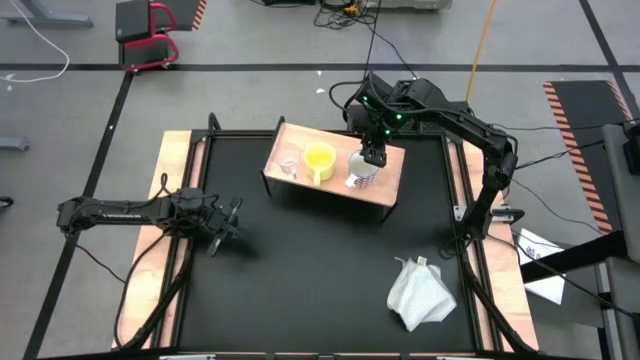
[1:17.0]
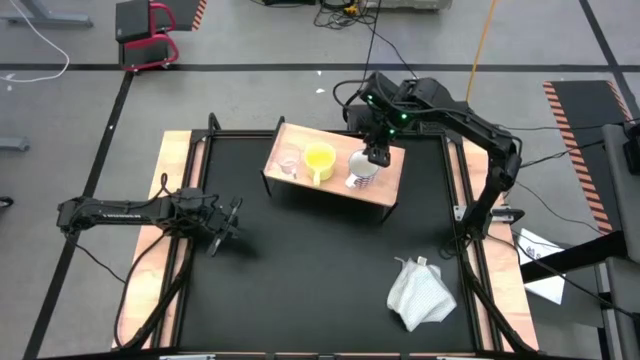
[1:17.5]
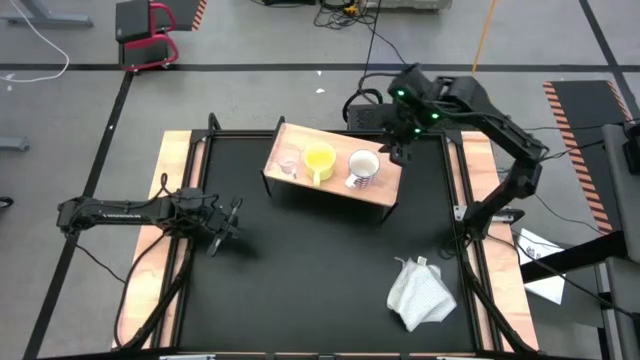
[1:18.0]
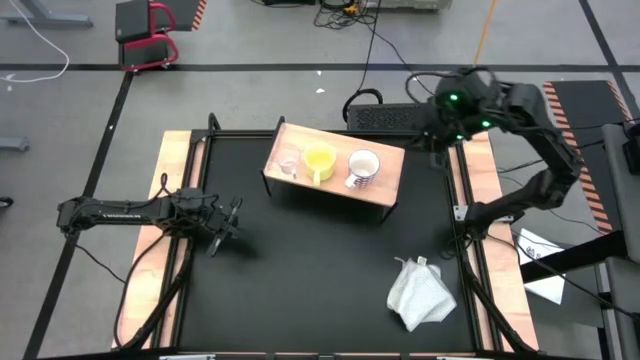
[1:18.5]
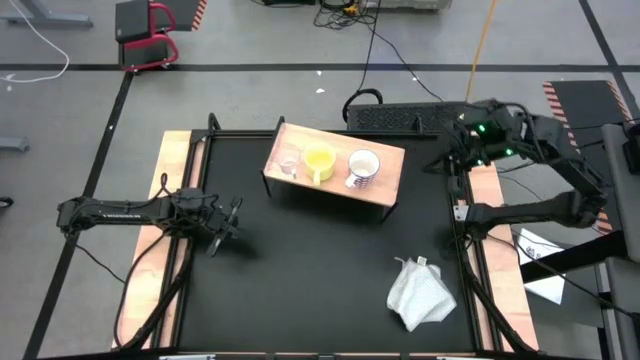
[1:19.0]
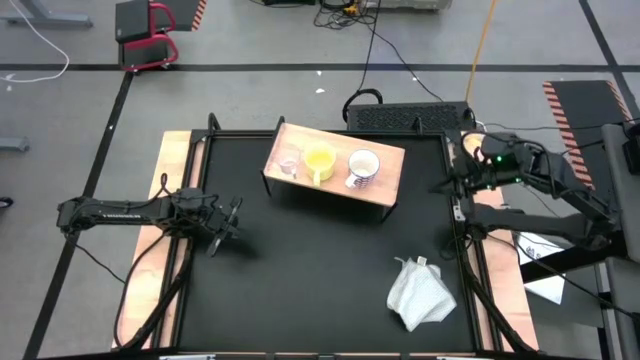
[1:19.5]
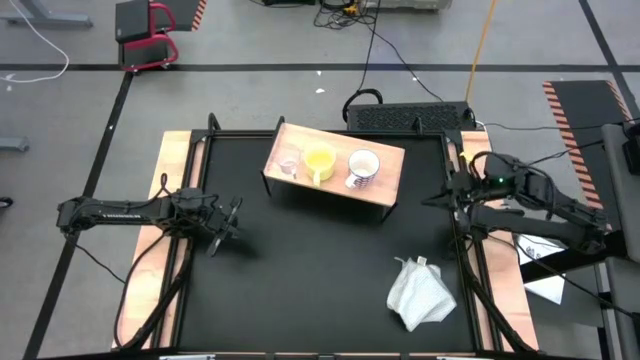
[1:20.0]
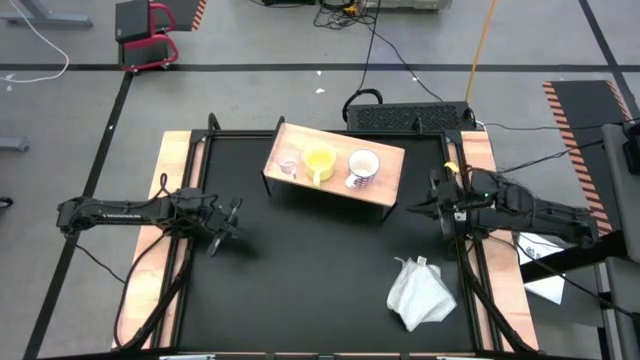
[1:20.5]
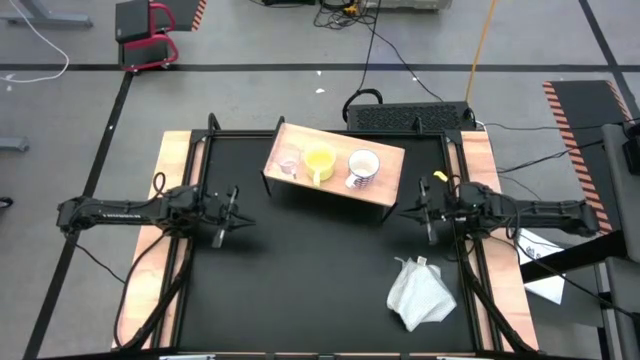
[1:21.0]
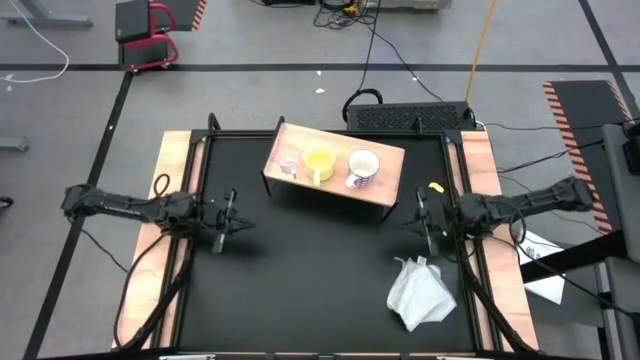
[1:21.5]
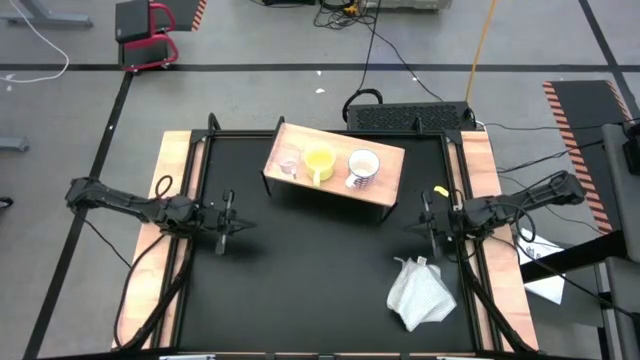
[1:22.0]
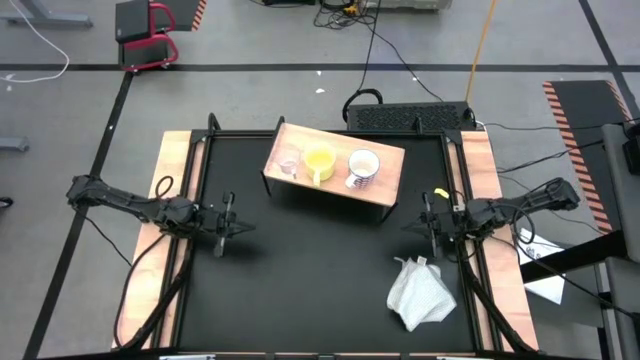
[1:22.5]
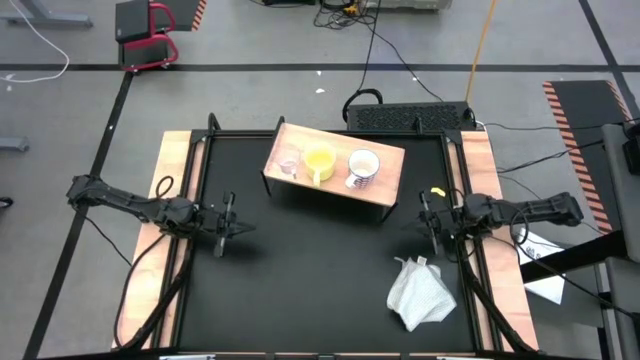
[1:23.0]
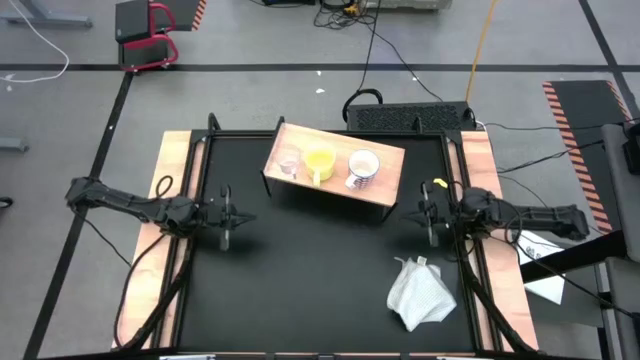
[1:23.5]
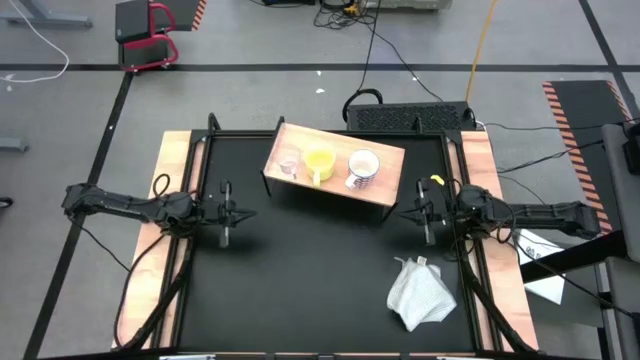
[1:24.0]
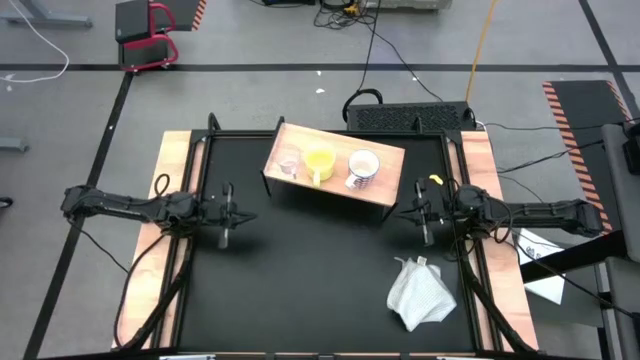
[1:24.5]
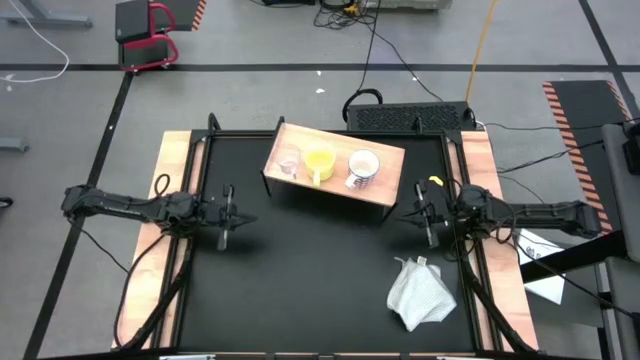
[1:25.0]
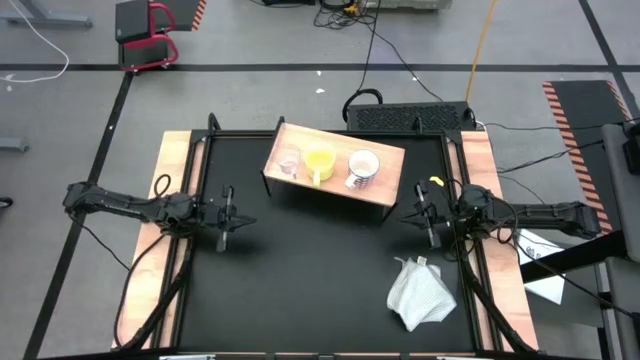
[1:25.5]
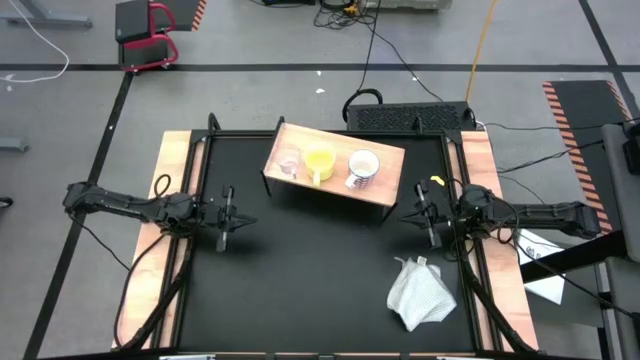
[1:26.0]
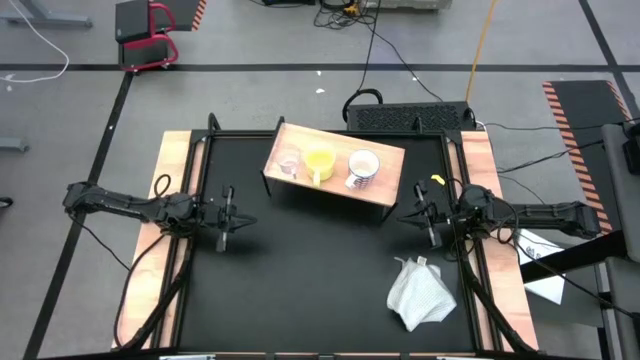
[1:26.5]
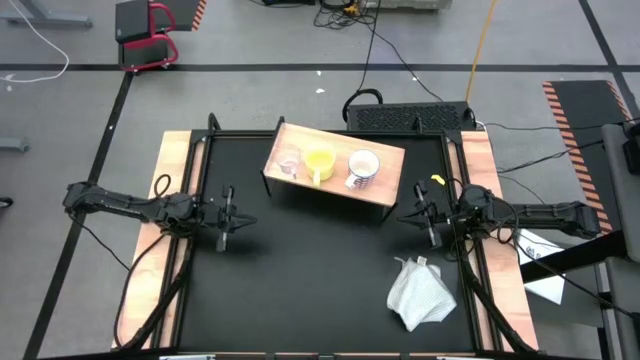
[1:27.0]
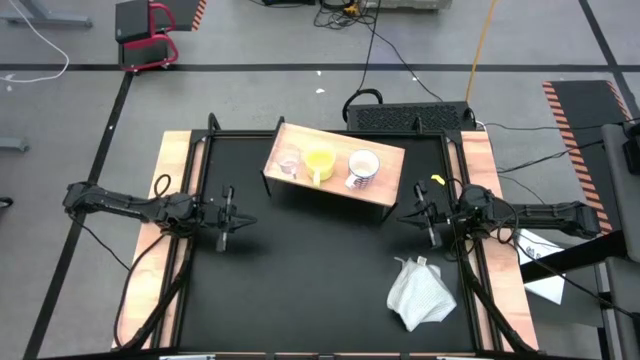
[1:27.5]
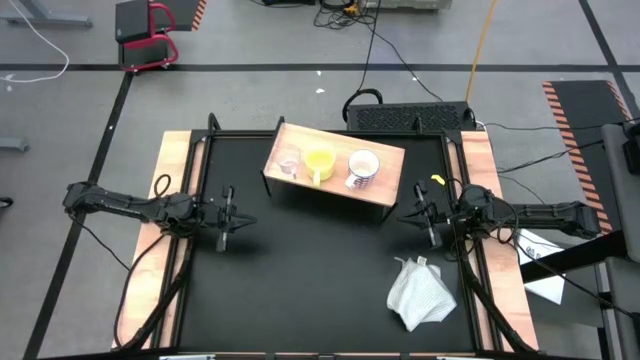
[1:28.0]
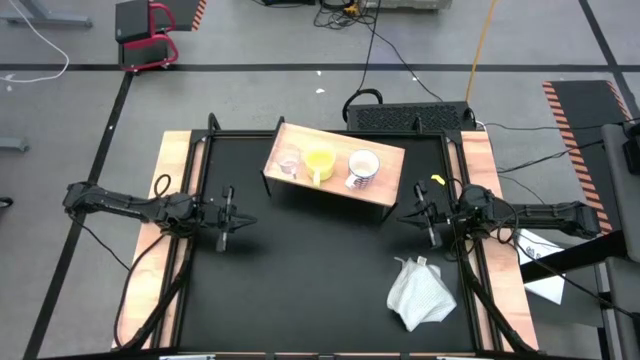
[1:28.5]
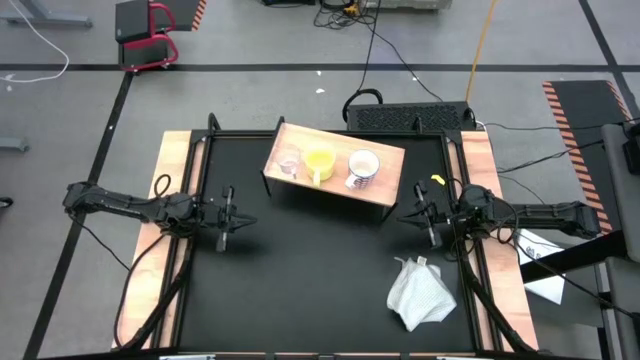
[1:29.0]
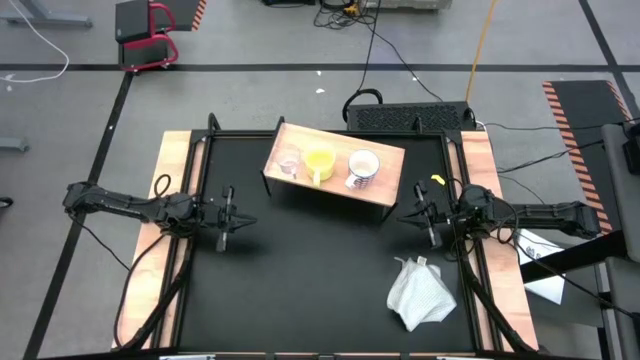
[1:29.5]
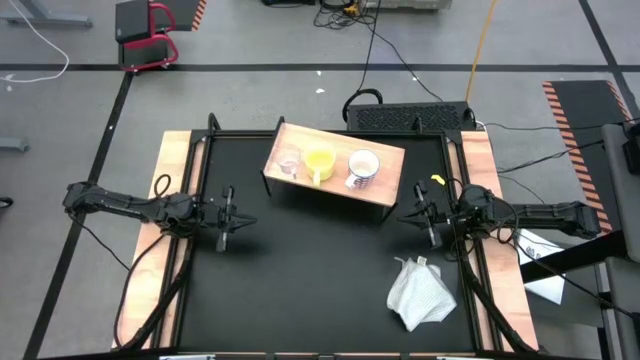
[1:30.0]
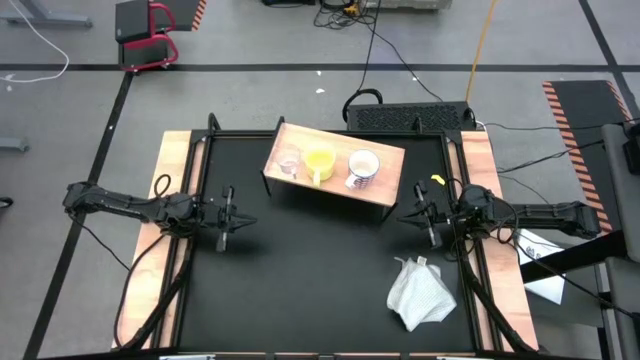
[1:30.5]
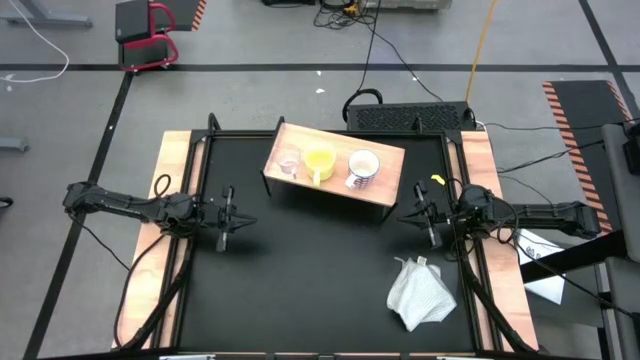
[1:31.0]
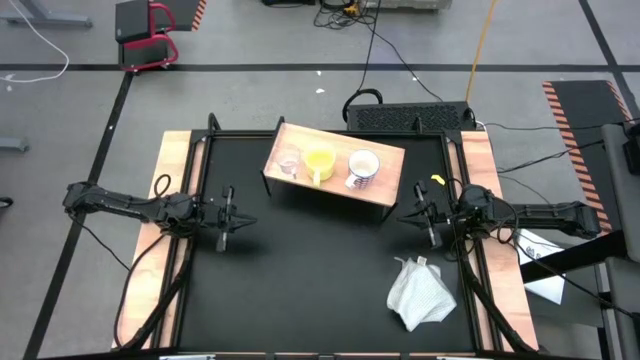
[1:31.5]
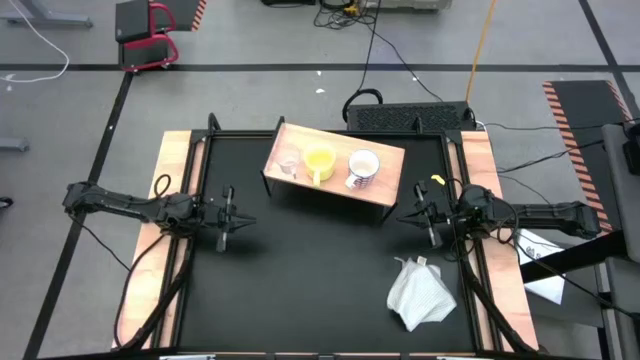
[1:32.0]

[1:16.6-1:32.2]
Task: Stack small to large cups/mugs on shelf
Return to Home Position

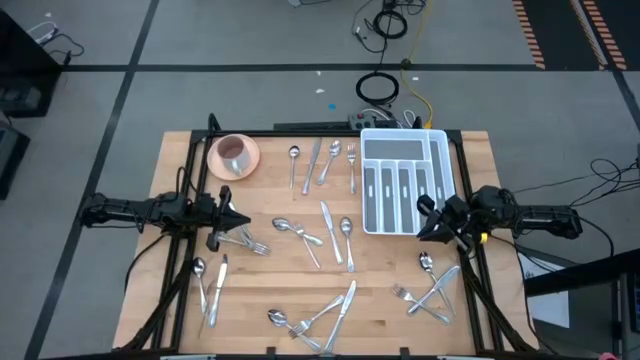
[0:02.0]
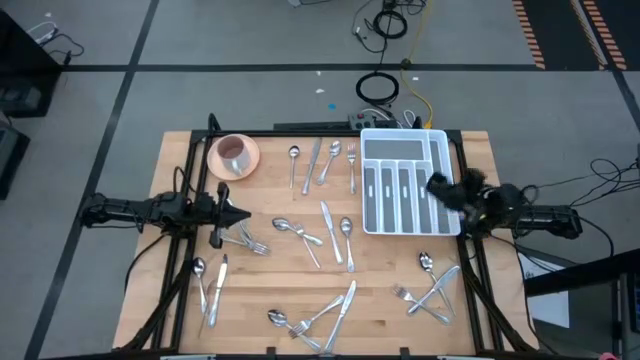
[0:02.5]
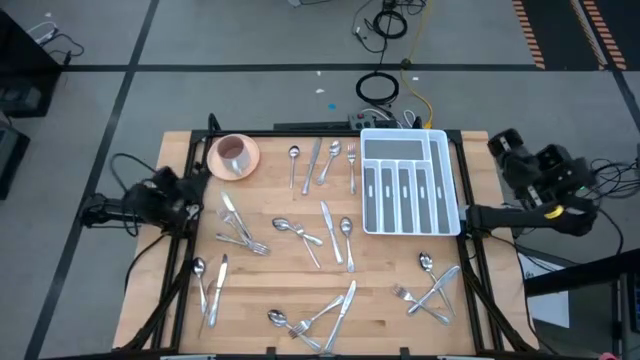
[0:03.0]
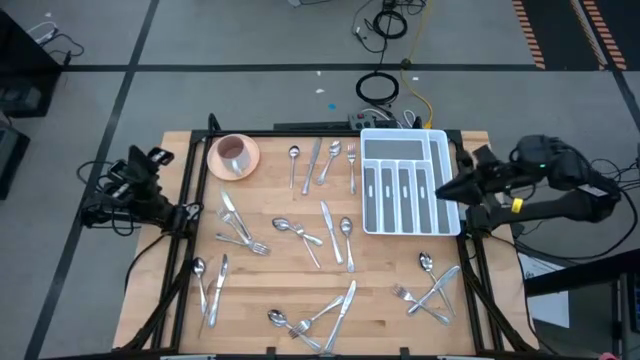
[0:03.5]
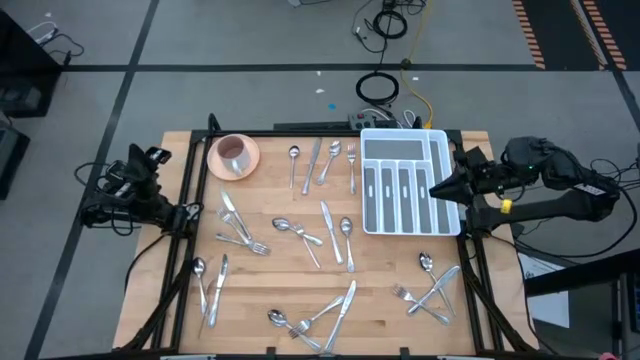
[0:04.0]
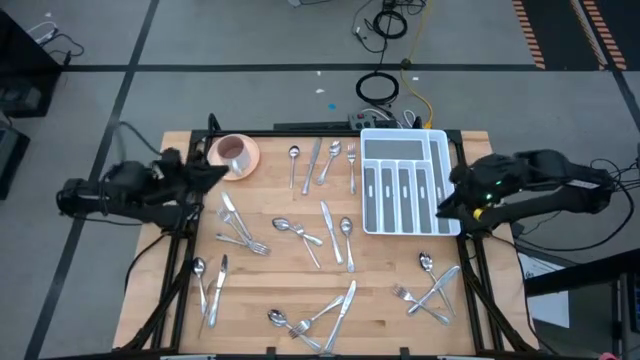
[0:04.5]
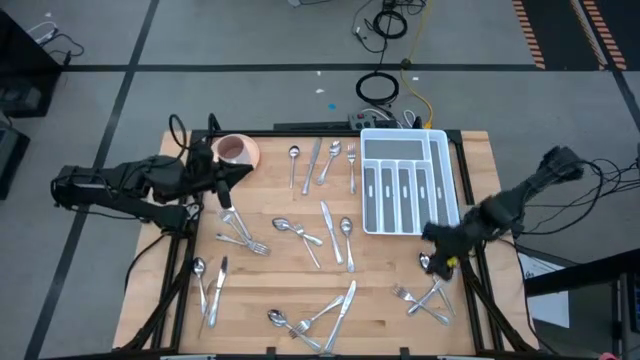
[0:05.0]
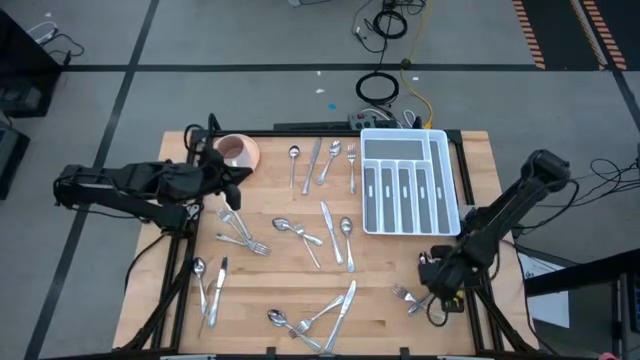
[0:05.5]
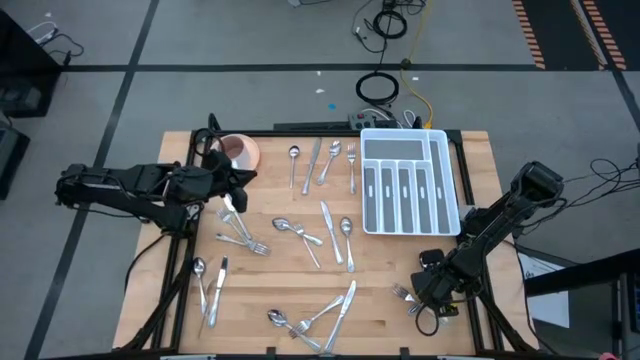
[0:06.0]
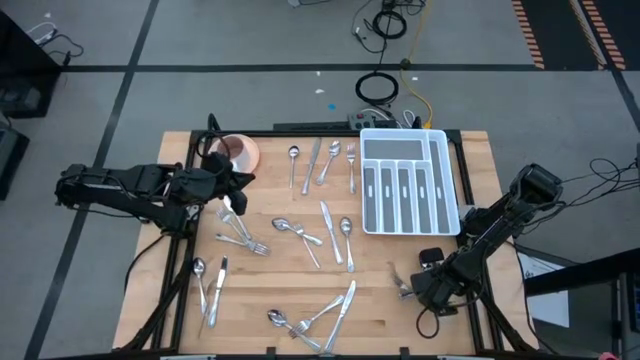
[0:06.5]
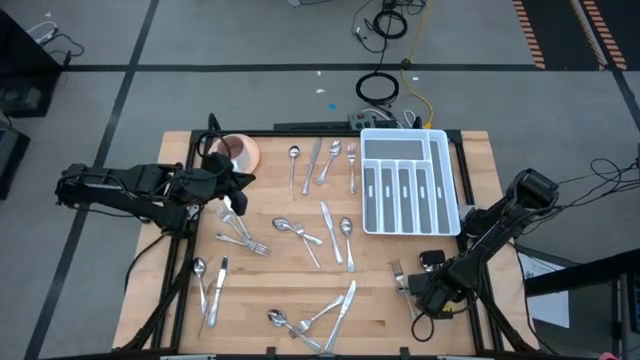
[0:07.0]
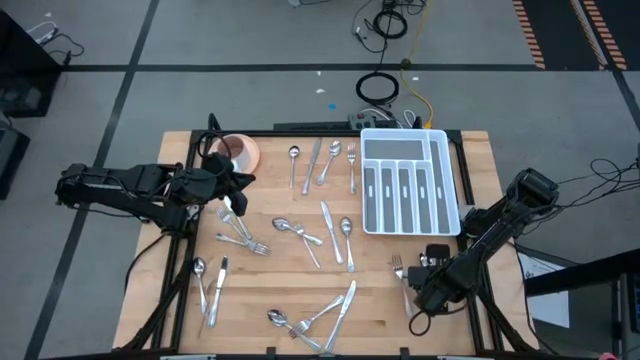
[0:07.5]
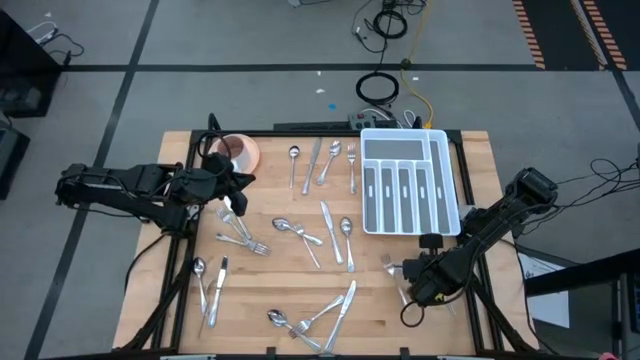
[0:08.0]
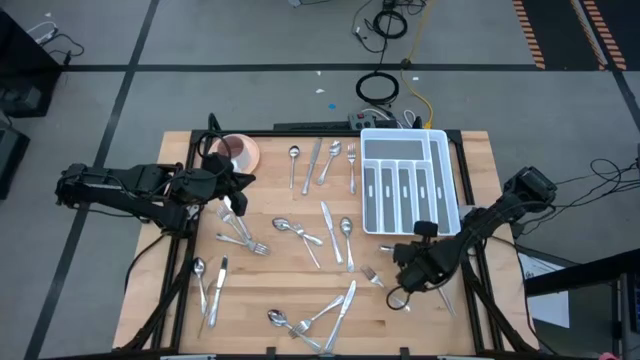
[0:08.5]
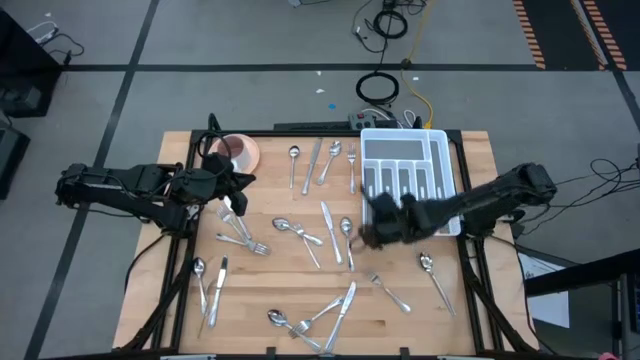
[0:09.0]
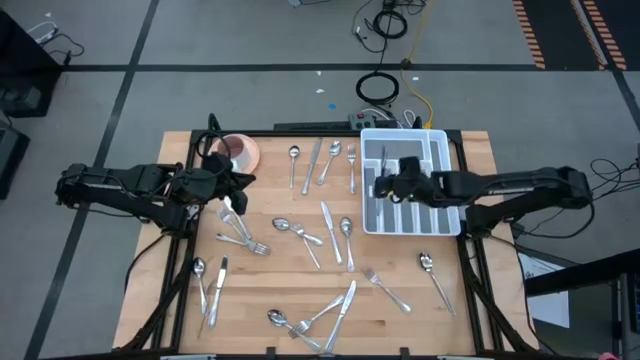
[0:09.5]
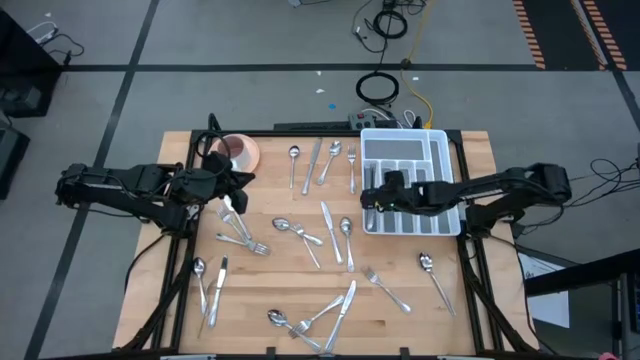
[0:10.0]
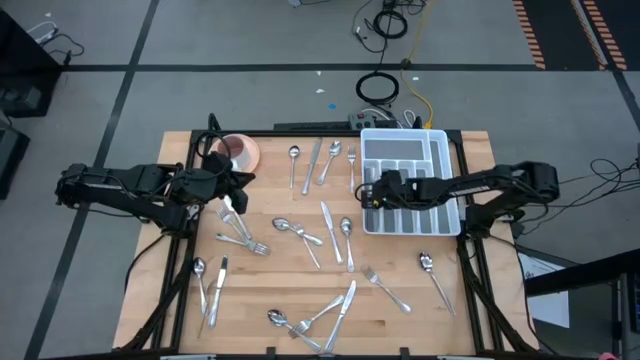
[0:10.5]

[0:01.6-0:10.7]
Task: Sort silverware
Put the silver table knife into the silverware rack
